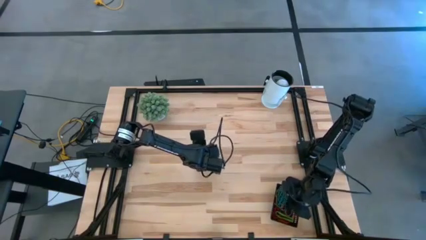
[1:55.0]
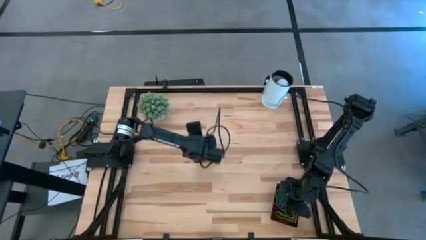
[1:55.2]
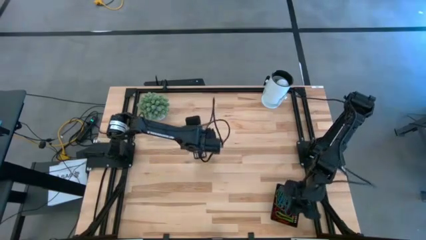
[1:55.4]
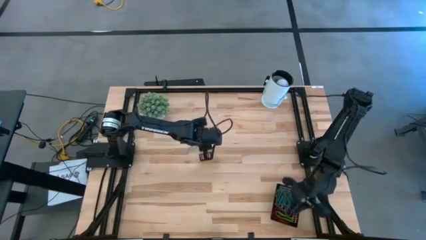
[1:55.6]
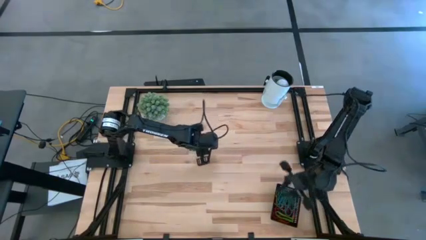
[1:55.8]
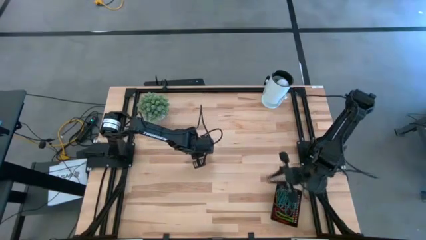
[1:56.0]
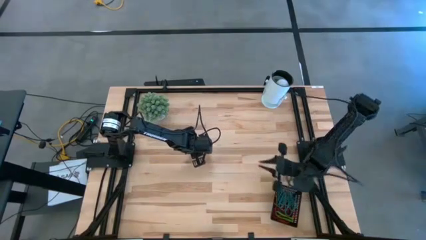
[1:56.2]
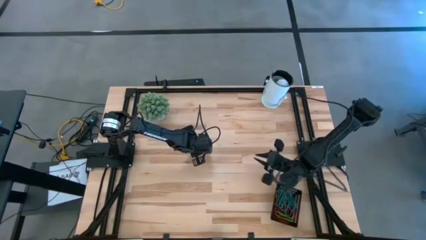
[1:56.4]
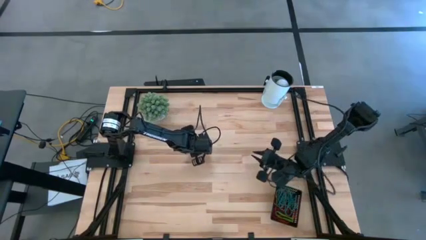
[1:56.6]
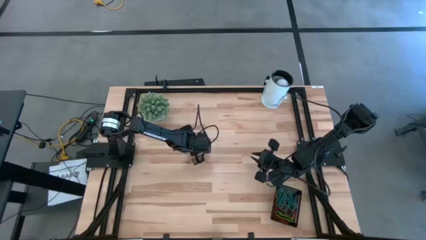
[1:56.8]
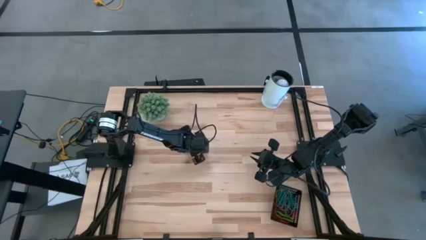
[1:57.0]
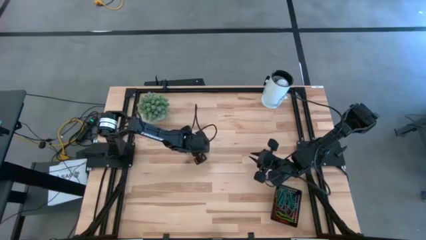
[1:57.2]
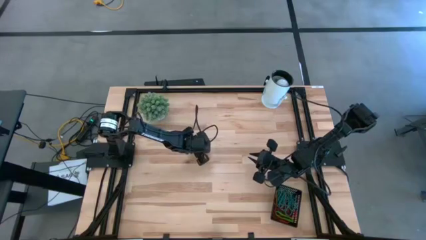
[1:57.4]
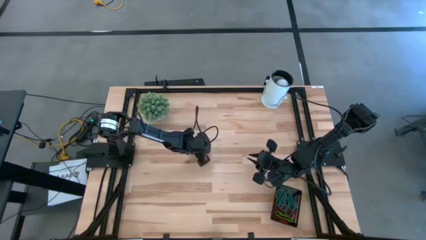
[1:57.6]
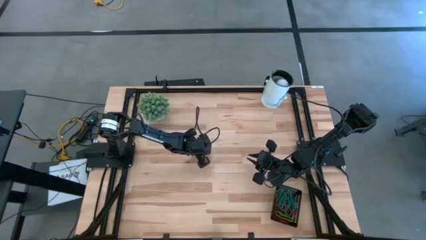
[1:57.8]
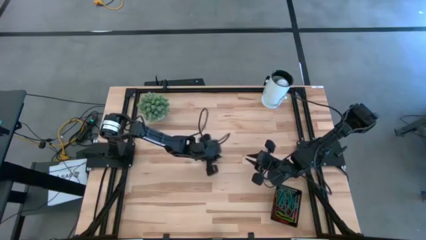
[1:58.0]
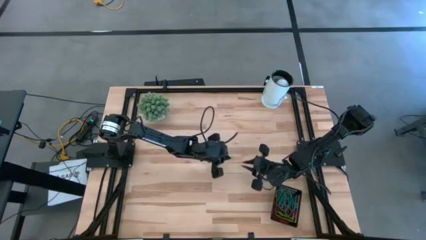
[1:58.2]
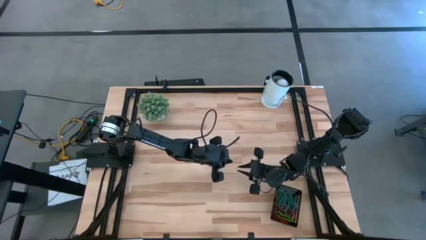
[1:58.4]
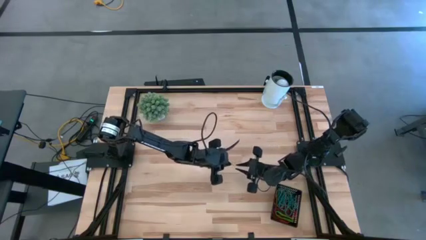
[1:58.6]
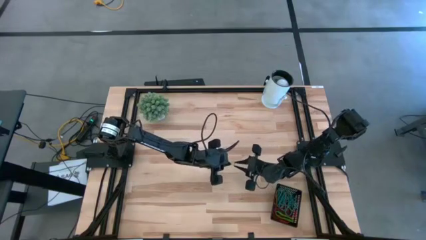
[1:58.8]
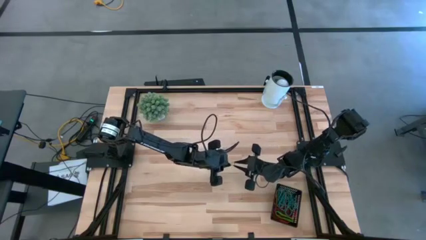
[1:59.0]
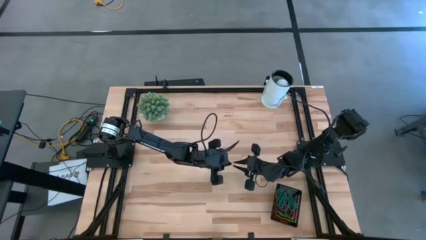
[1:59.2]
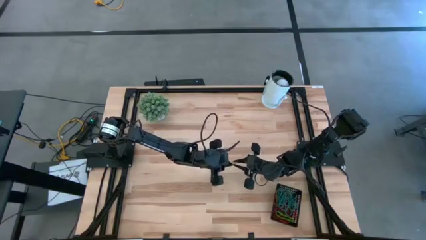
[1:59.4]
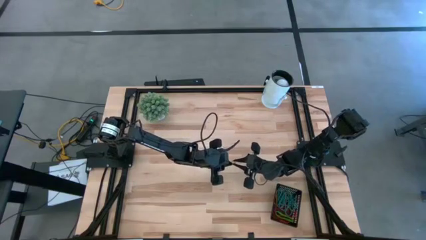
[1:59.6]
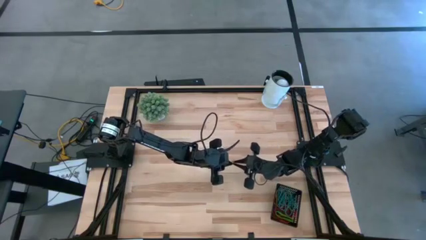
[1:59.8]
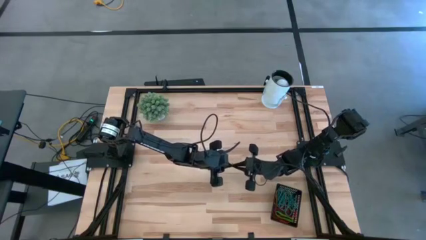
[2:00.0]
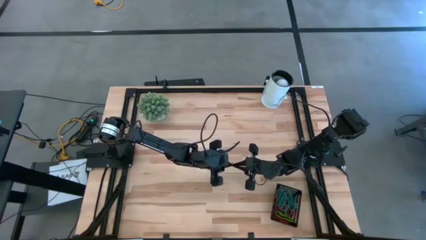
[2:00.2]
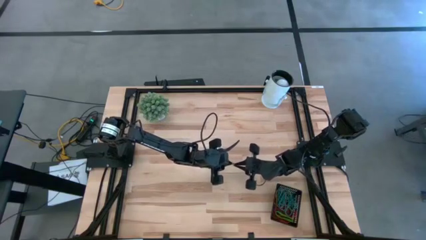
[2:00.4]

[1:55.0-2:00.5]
Task: Pick and place items into bin
Put the green rubberband into the black basket

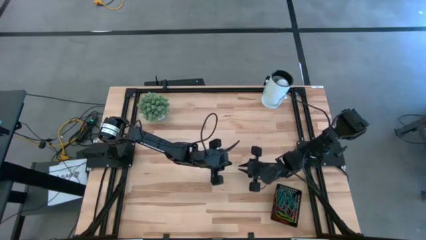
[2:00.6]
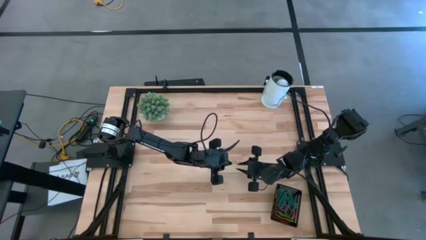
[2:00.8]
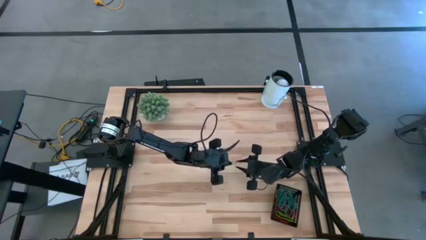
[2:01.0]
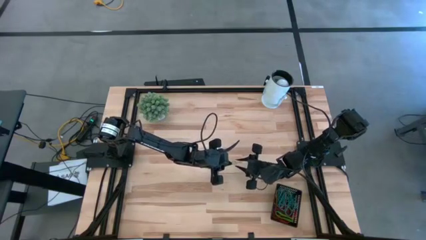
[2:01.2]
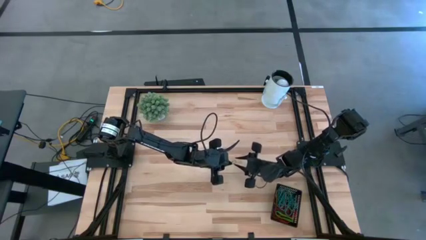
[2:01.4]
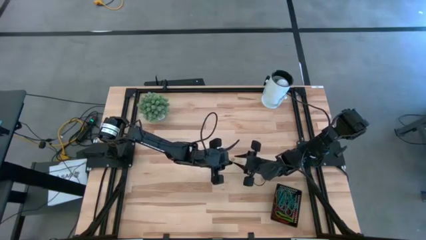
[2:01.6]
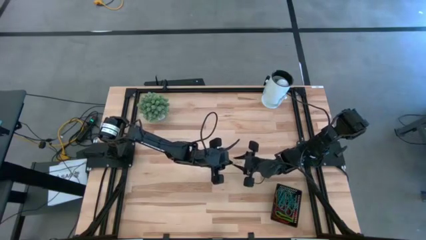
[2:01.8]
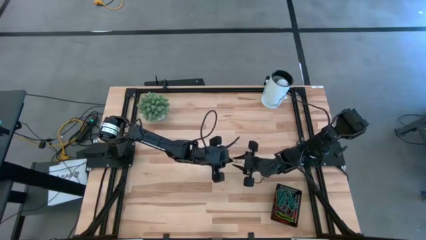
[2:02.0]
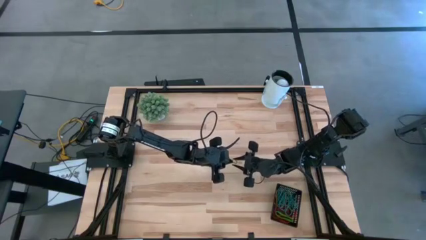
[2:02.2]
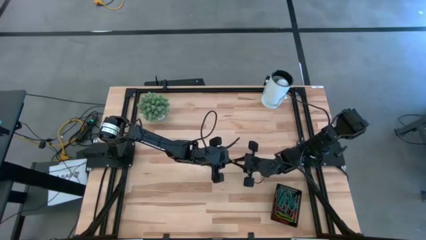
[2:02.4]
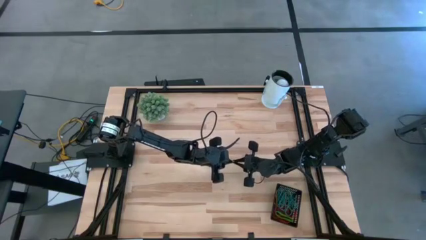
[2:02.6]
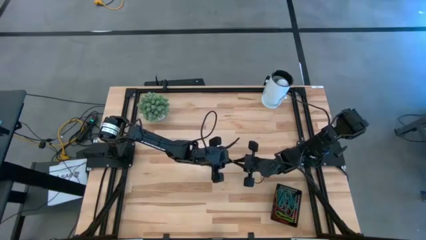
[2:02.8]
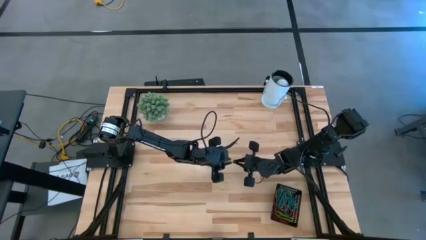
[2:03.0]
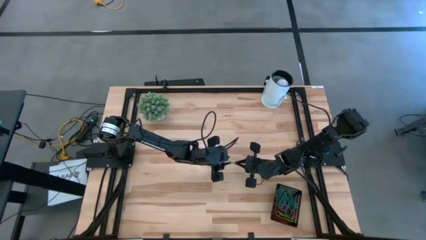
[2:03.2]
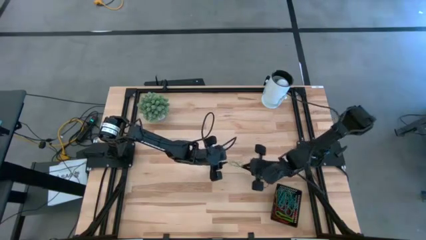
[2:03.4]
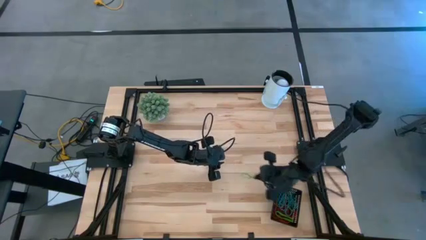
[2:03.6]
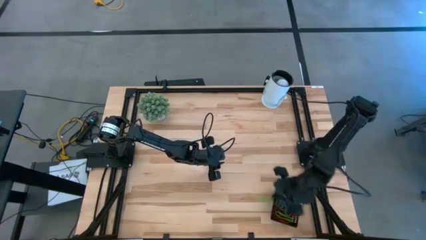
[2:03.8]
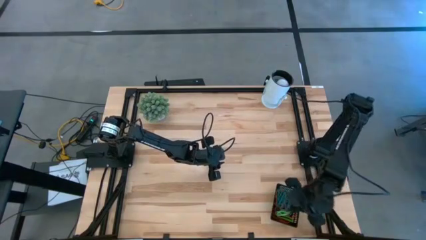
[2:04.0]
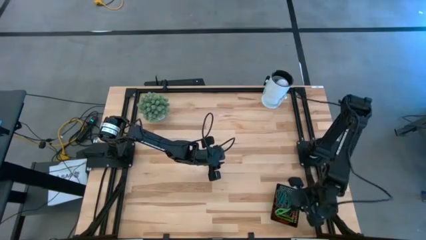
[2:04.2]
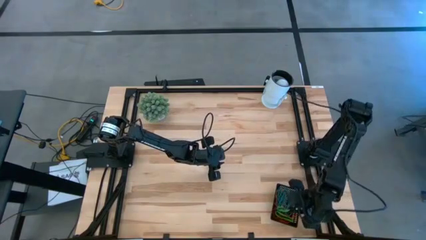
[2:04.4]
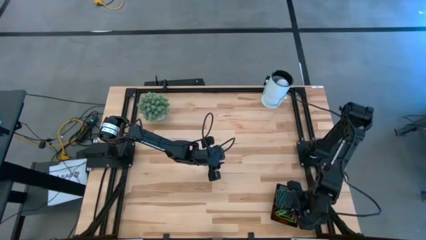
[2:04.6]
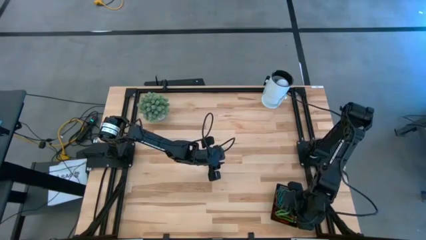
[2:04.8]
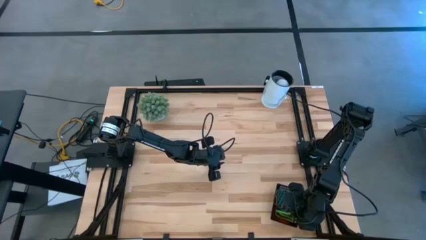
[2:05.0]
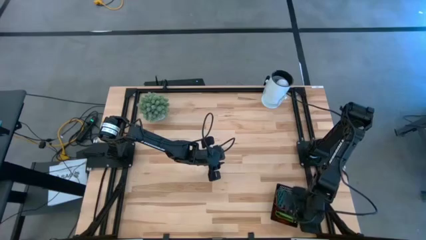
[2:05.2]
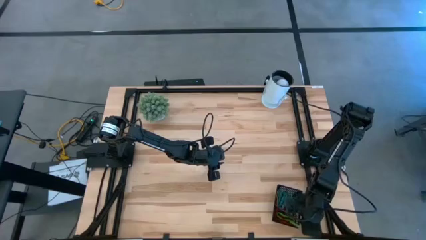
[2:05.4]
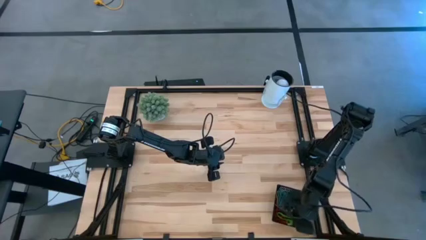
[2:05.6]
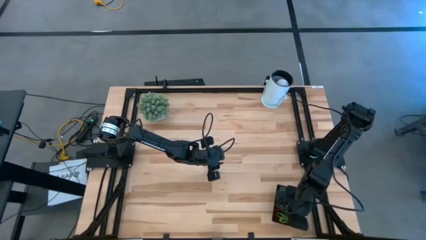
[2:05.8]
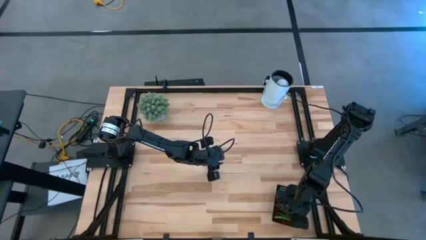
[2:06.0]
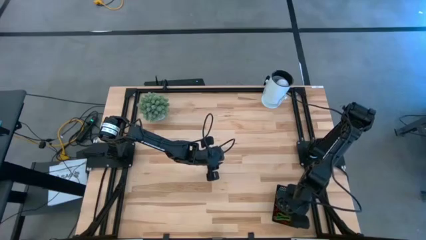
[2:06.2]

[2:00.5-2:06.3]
Put the green rubberband into the black basket

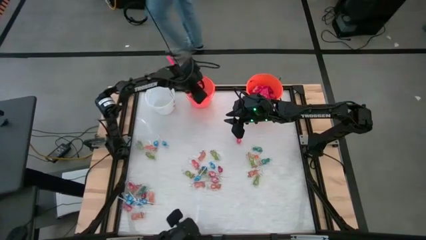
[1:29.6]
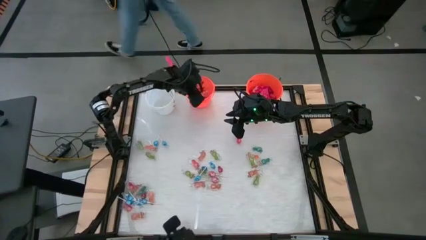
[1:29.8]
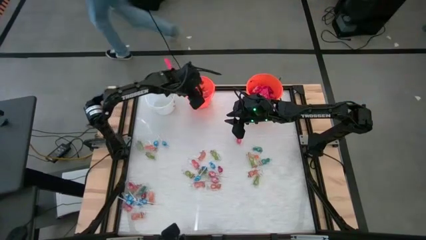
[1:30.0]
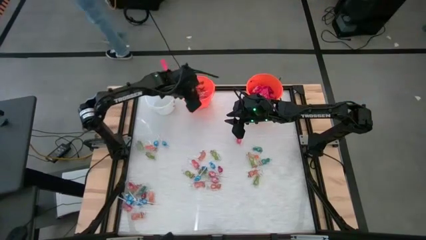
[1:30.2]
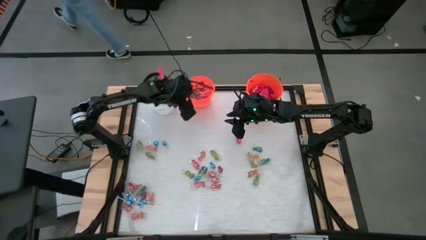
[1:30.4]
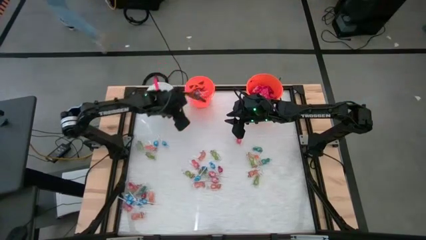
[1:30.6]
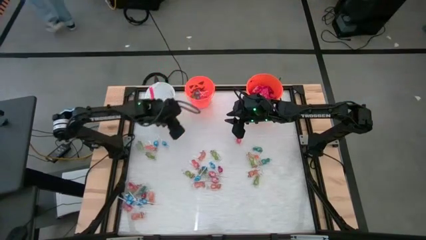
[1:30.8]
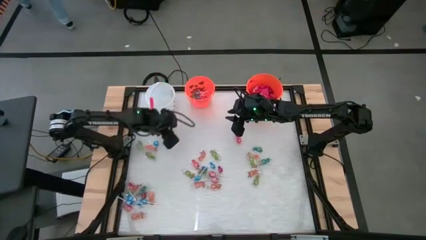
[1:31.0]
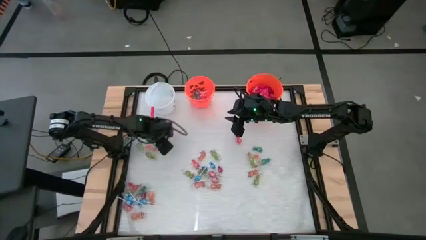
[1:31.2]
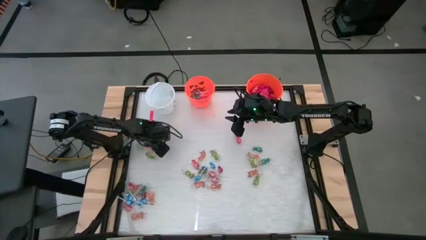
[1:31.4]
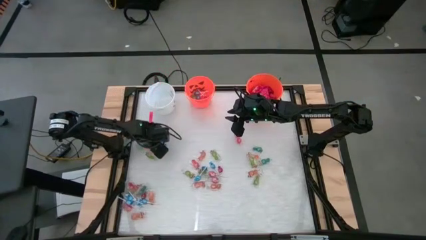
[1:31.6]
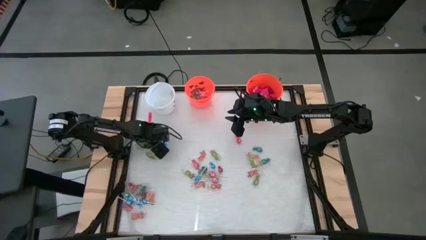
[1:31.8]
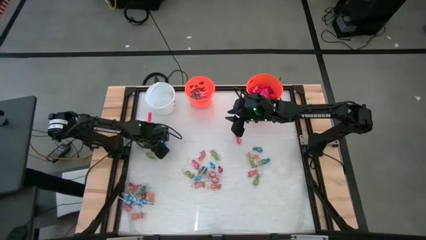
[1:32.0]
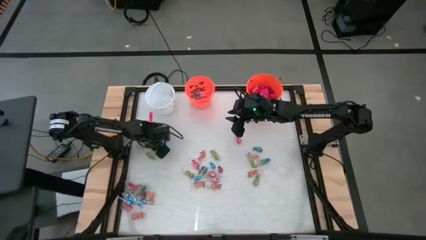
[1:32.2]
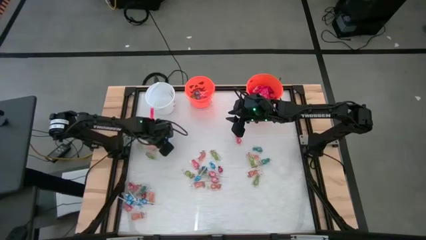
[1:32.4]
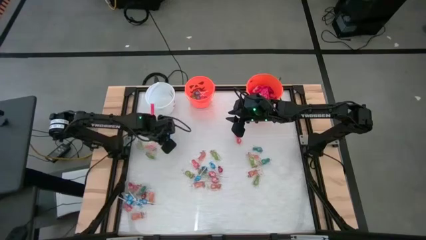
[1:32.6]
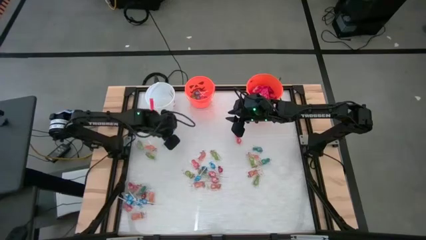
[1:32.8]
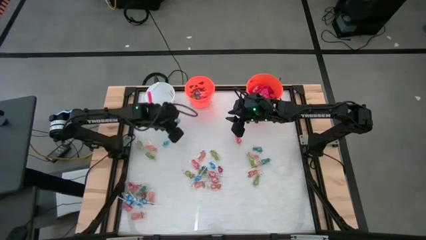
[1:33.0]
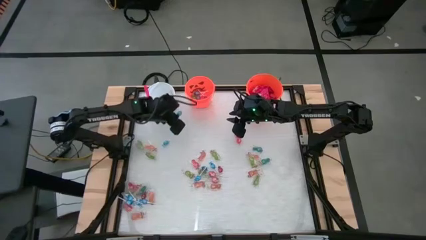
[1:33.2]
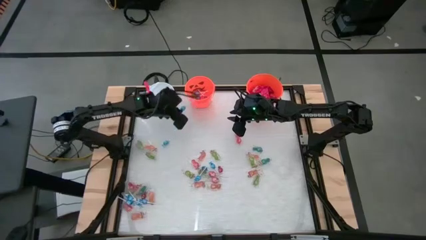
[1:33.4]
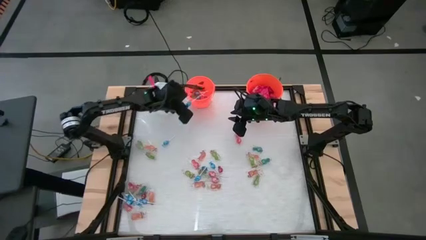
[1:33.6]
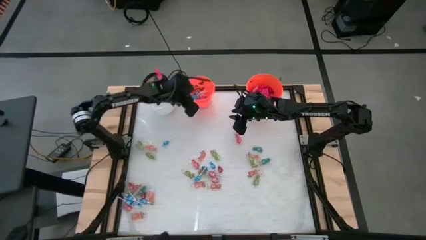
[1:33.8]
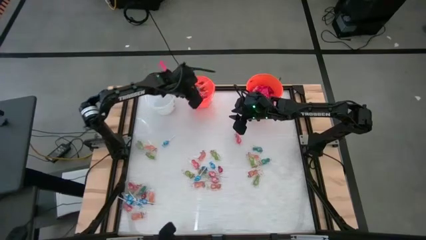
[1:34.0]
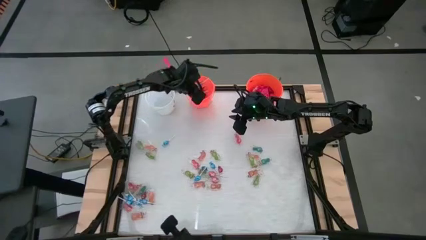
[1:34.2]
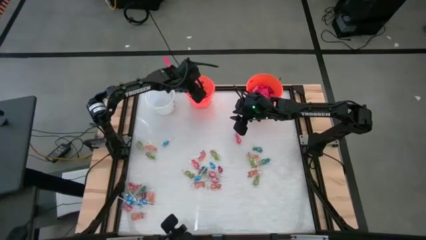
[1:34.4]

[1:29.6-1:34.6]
Task: Sort candy by brand, put in halloween buckets
Put the blue lollipop into the left orange bucket

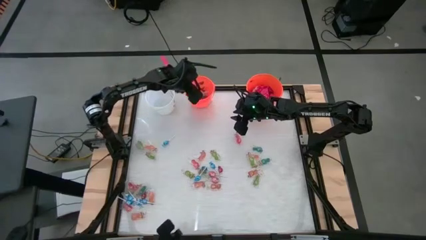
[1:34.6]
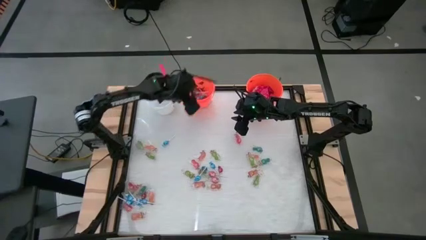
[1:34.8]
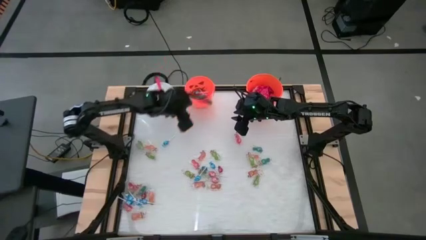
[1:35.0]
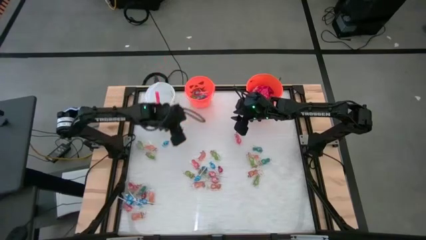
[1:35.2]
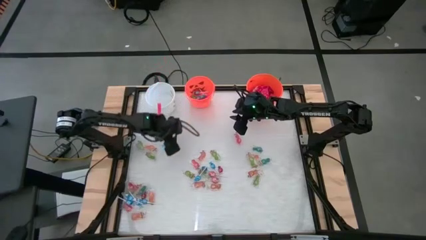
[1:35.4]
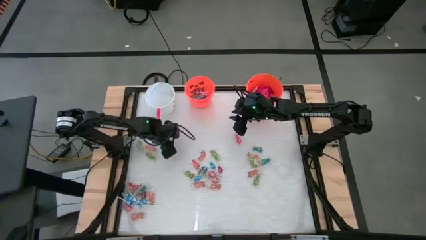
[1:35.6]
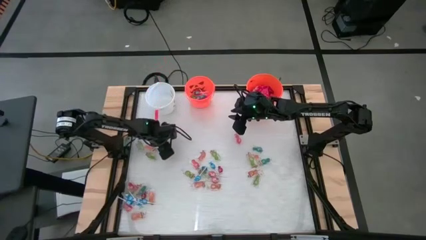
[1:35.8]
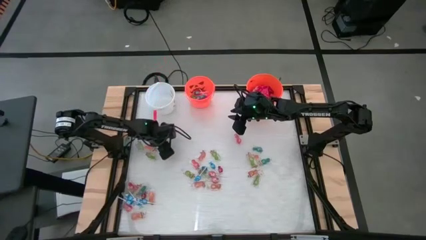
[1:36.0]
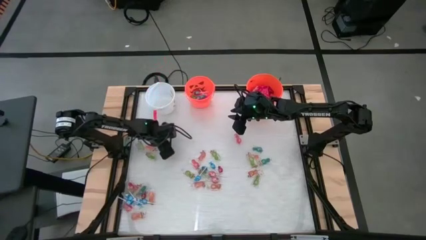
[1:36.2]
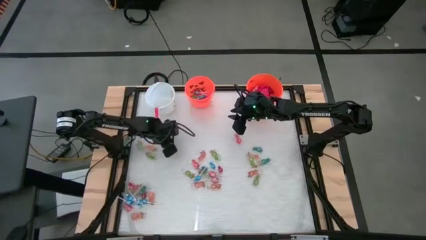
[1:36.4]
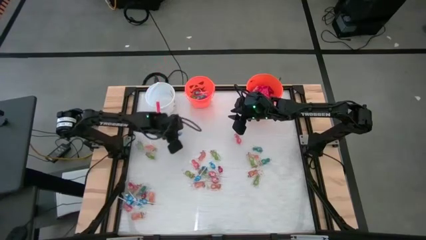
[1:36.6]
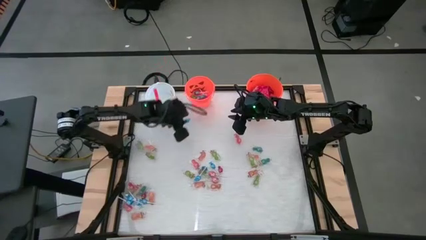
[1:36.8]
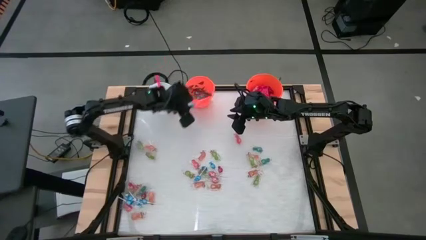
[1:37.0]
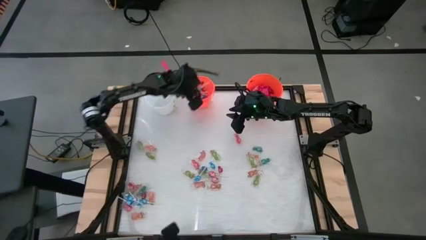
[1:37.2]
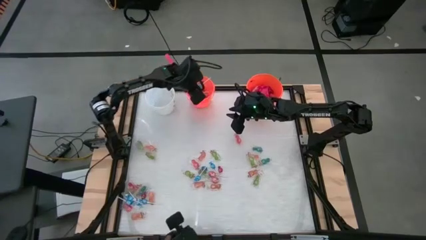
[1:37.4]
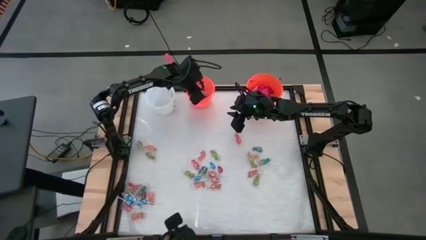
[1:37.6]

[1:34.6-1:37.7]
Put the blue lollipop into the left orange bucket
